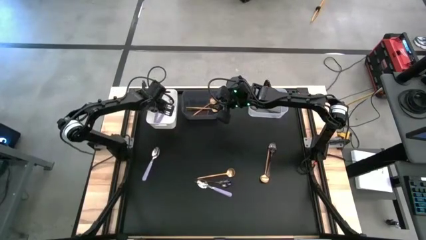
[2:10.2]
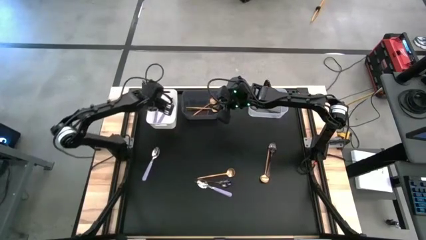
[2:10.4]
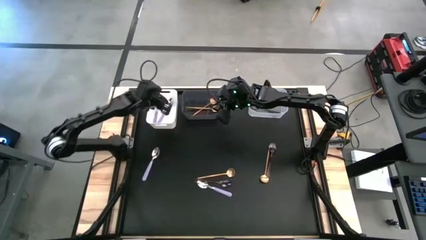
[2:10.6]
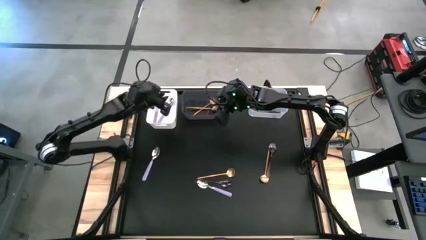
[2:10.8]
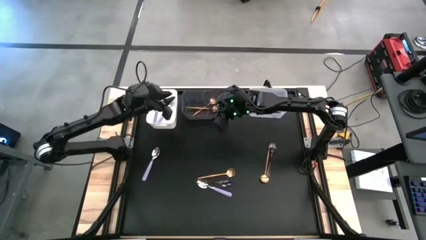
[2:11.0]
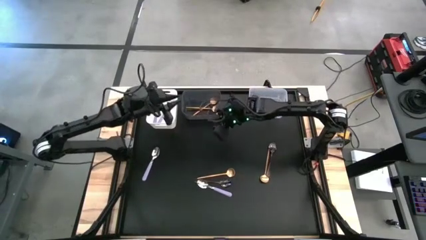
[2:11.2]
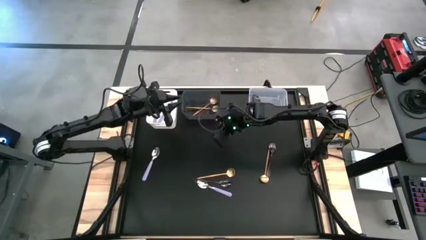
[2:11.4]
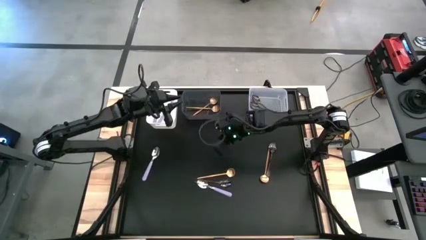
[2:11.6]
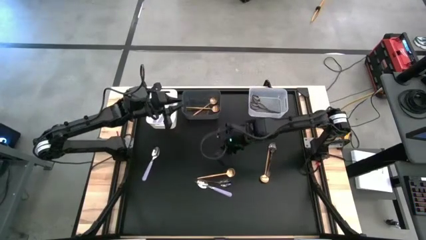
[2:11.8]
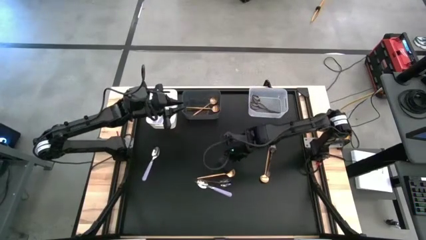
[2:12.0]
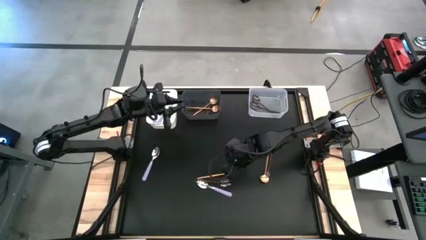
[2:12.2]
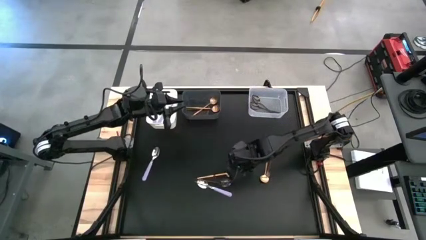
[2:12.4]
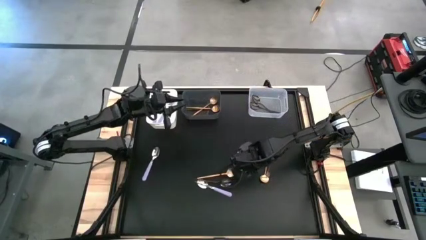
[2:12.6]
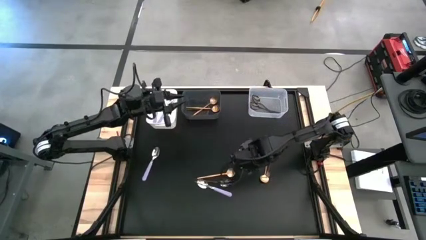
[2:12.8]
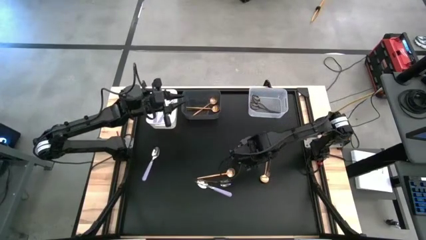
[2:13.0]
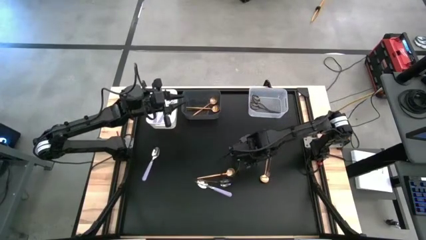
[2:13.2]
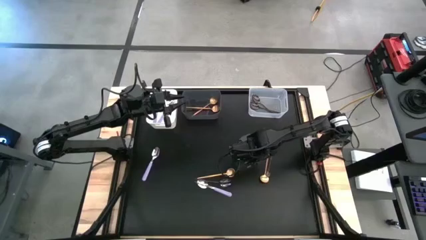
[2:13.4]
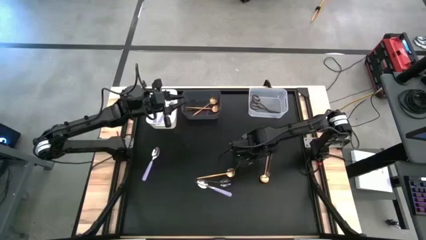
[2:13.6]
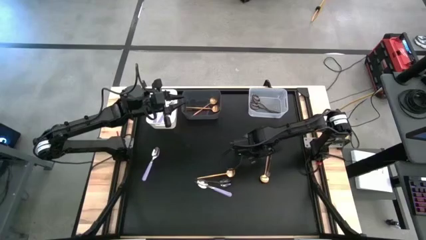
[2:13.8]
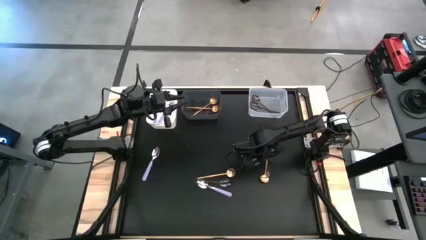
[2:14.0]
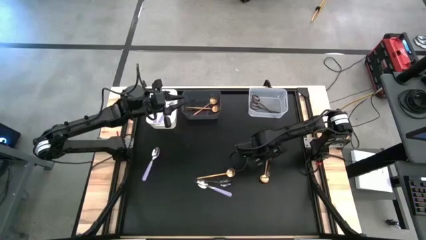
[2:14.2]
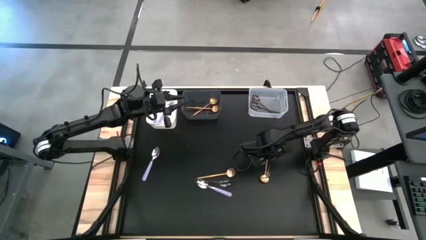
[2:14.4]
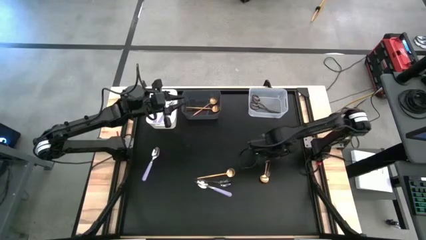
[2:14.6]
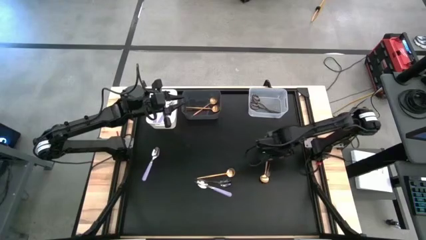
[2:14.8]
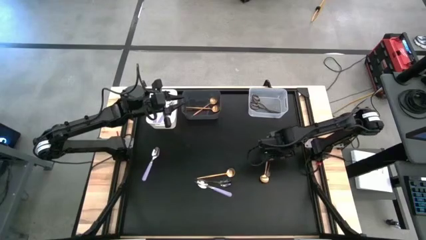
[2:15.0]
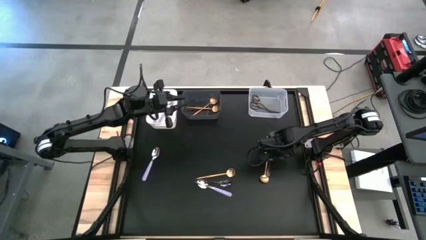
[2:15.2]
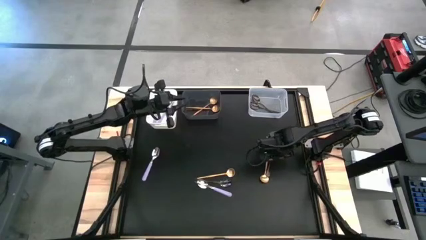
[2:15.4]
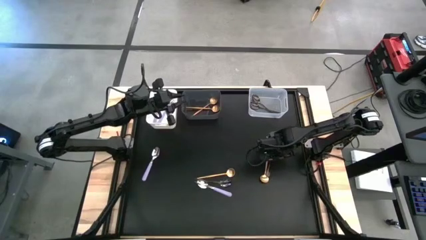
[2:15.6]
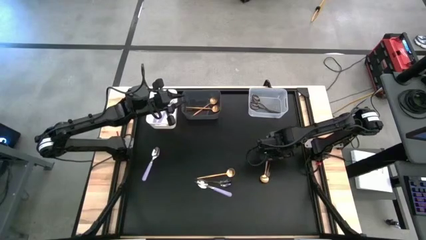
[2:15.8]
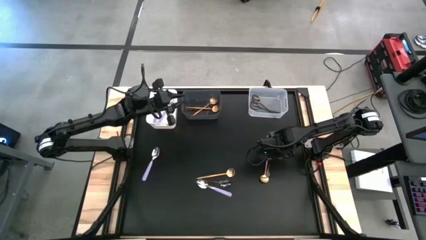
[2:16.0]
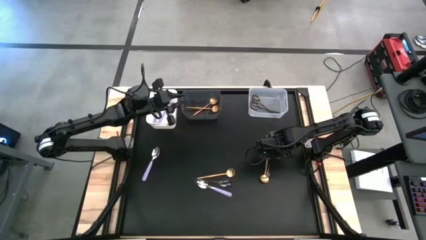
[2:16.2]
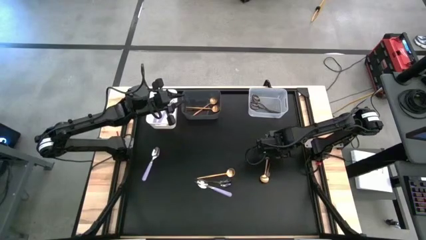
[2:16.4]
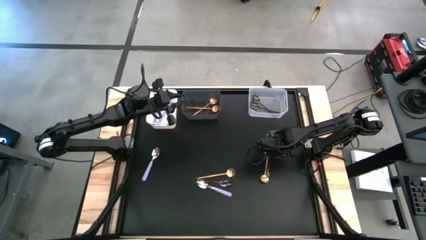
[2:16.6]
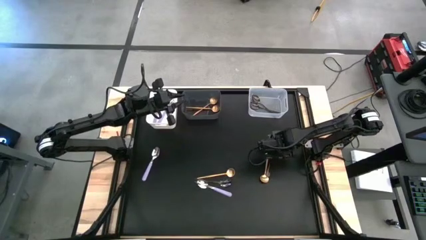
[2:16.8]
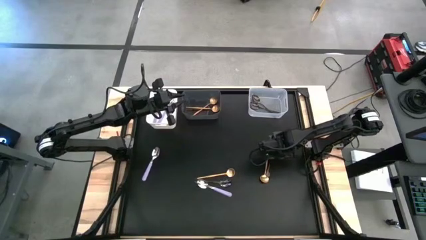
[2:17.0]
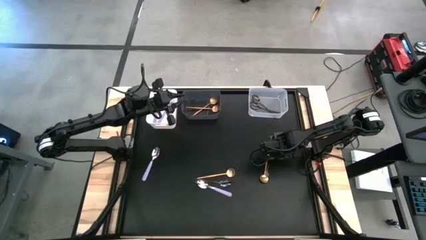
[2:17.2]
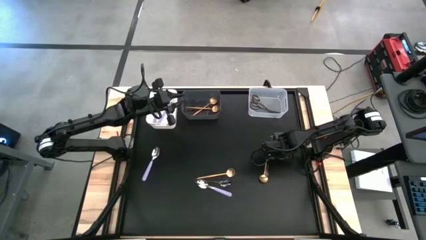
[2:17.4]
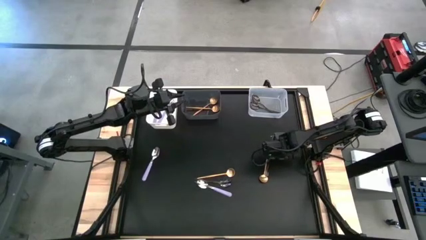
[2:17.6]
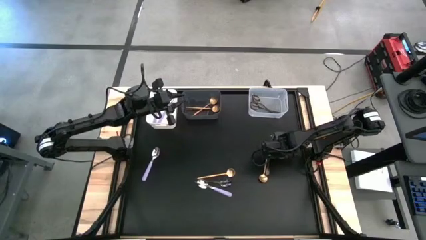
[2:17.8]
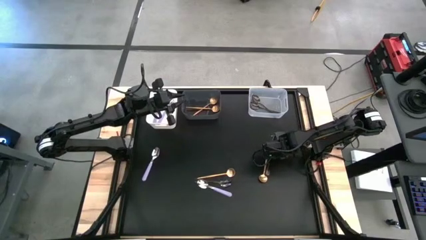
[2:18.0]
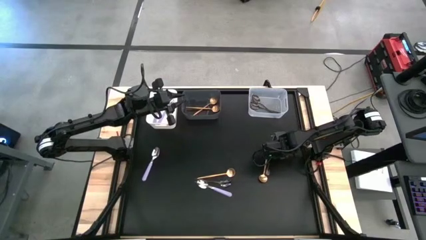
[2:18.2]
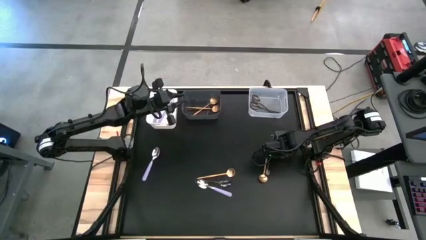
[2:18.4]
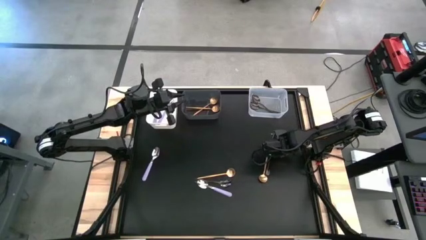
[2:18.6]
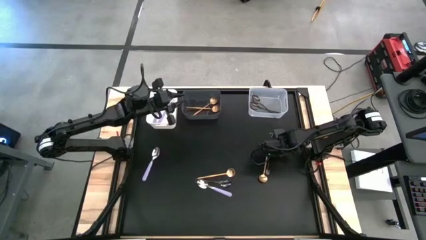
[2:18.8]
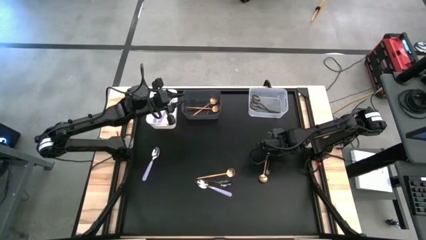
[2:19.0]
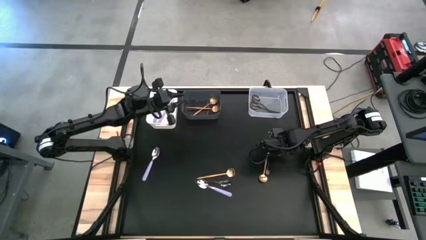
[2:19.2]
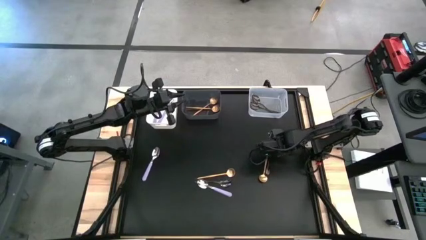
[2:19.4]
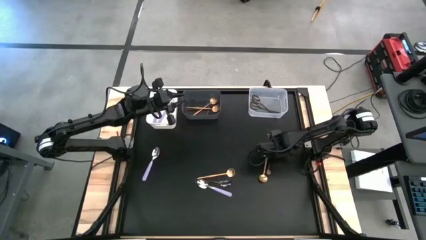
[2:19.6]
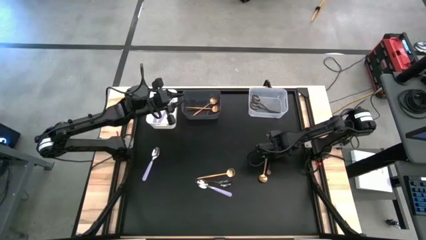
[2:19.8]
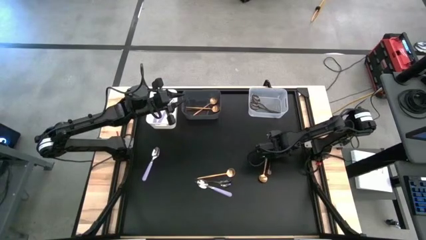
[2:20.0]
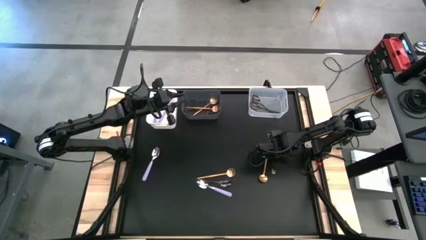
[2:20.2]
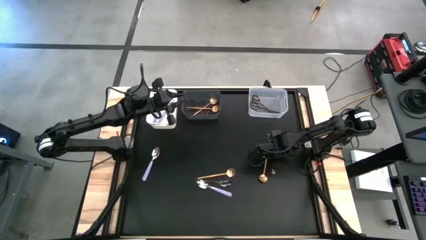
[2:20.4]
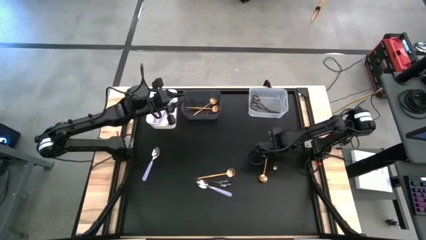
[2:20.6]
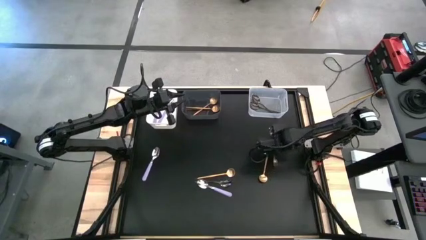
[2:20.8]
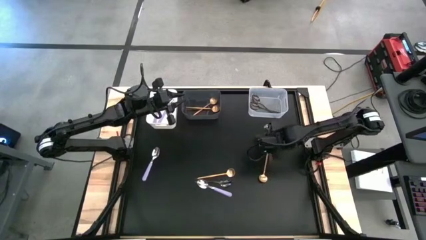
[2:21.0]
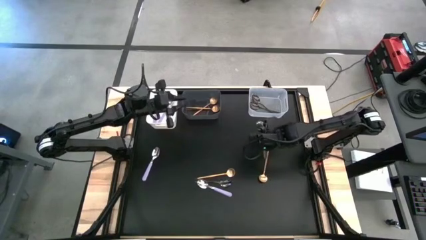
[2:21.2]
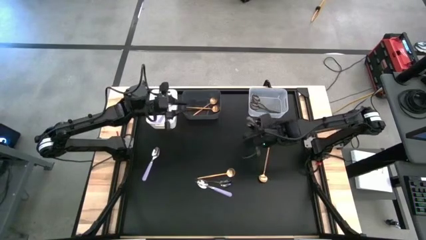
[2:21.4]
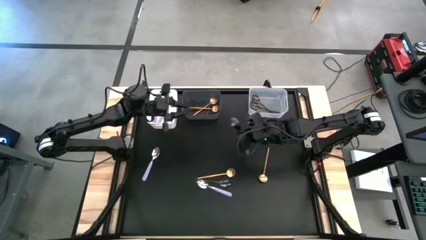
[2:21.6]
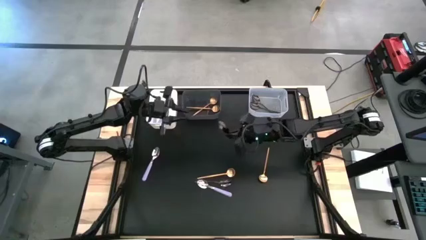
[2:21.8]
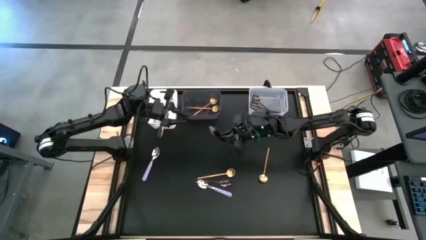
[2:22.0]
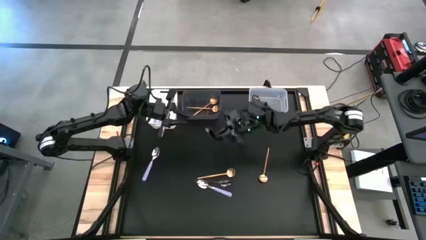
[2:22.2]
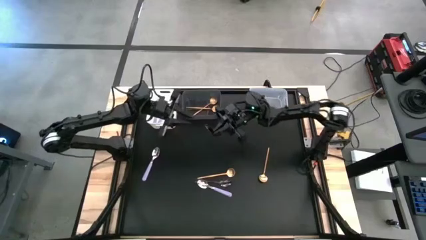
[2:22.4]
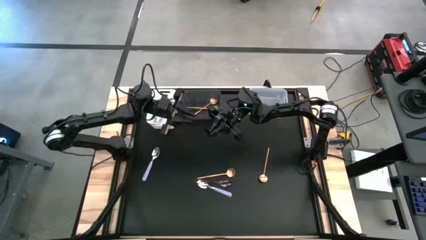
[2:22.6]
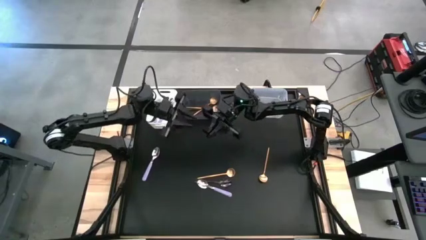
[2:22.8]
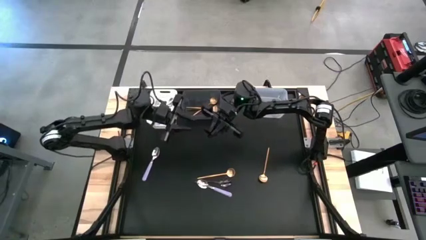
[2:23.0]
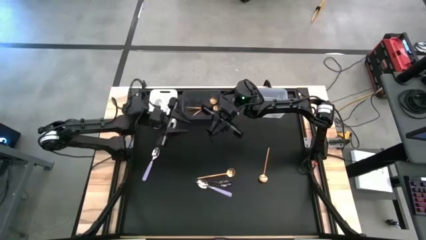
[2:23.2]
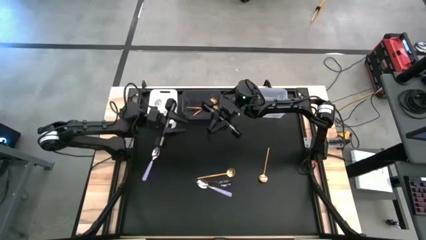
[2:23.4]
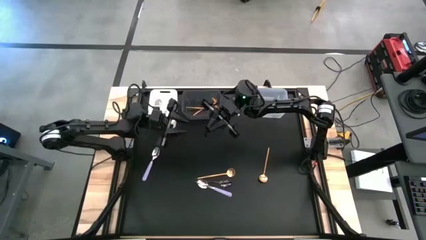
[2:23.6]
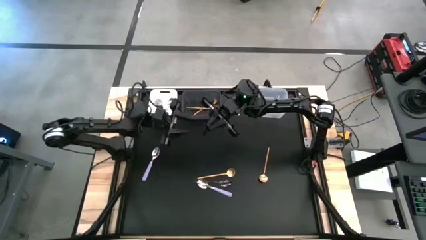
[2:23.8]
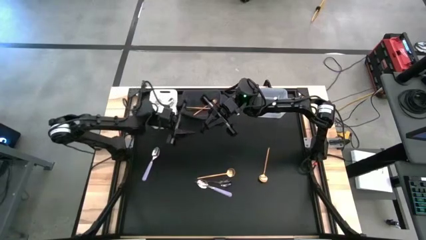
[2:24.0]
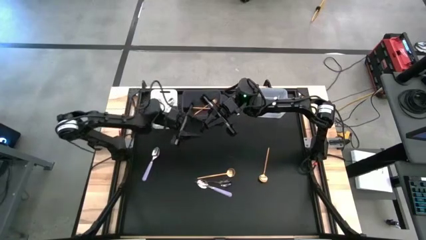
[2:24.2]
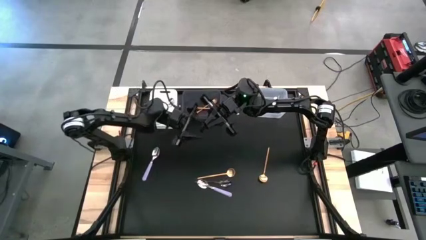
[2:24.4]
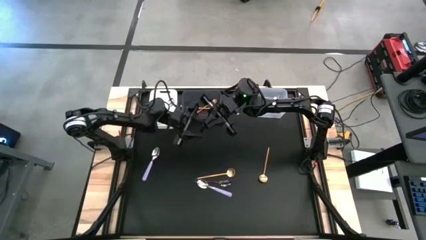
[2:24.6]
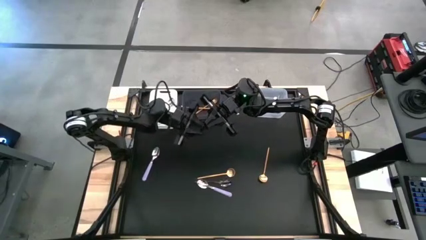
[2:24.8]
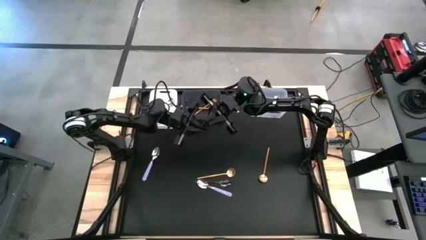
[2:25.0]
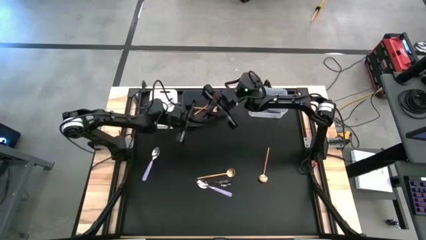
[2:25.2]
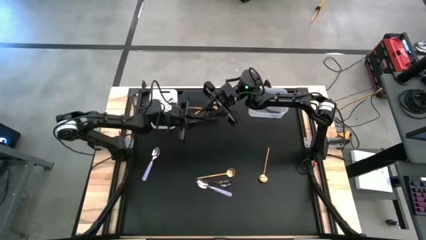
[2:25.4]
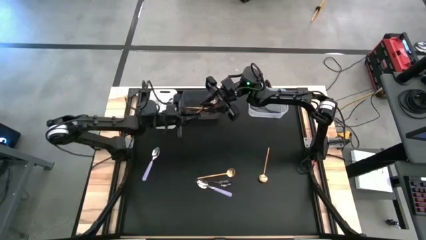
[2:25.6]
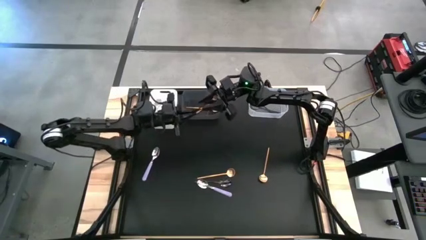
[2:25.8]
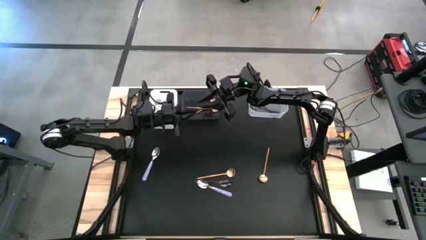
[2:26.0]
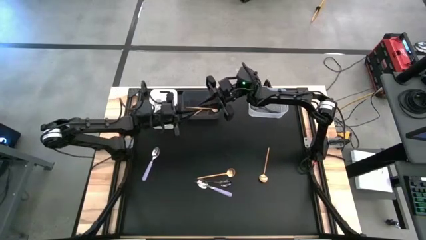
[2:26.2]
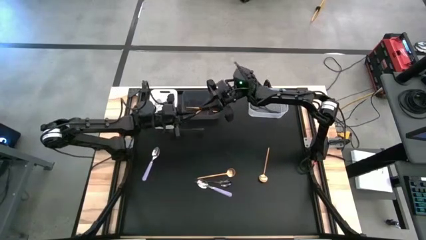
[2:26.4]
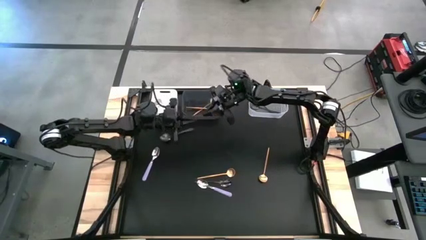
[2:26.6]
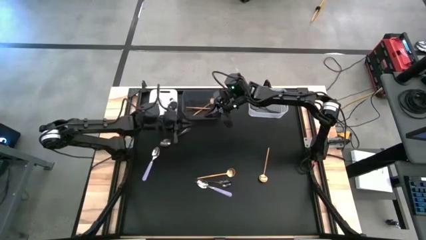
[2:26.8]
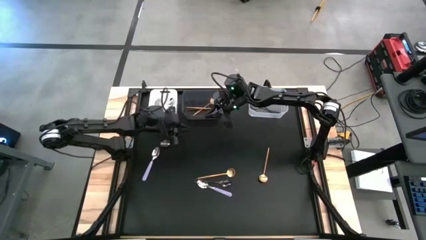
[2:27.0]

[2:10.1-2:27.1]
Task: Sort silverware by color (type)
Put the black spoon into the transparent bin
